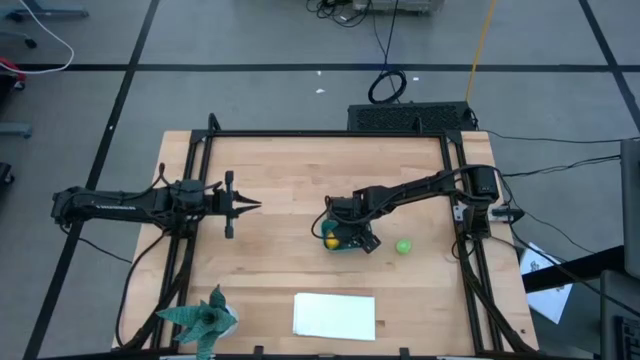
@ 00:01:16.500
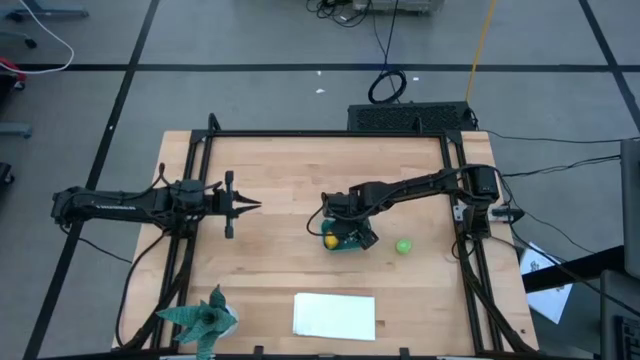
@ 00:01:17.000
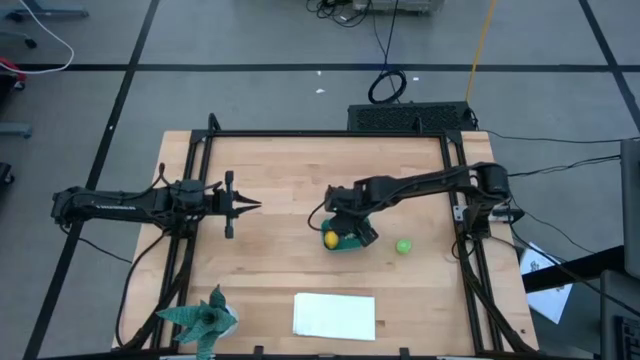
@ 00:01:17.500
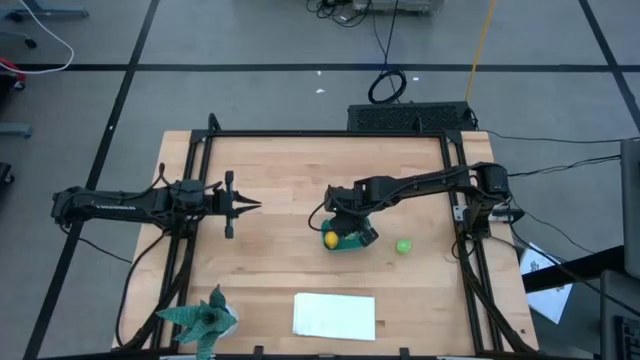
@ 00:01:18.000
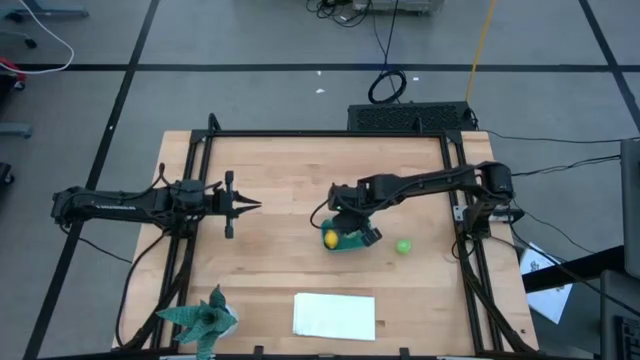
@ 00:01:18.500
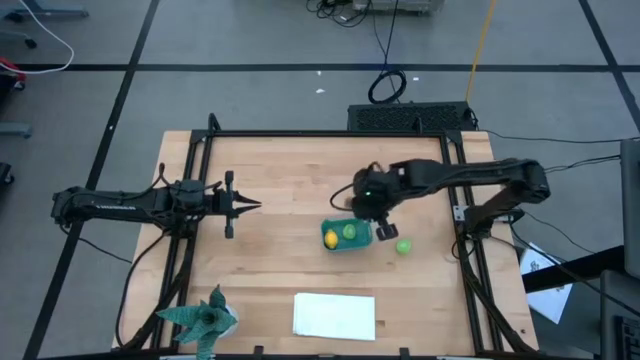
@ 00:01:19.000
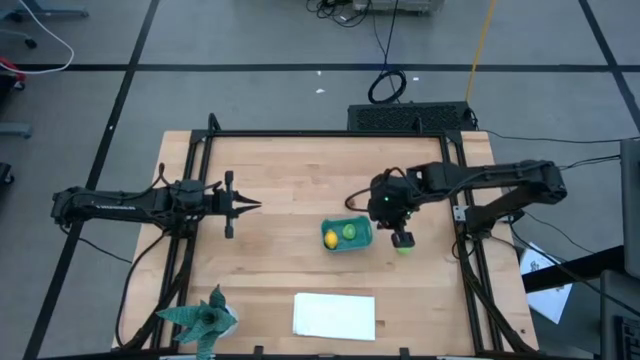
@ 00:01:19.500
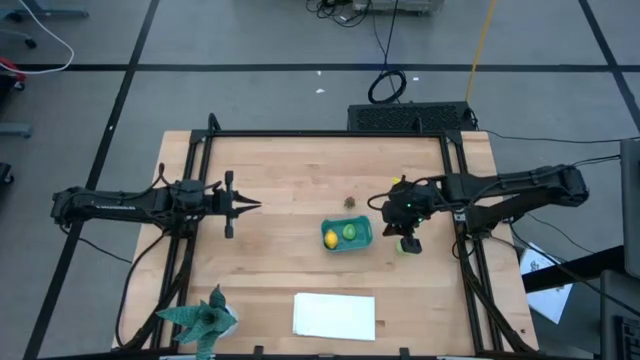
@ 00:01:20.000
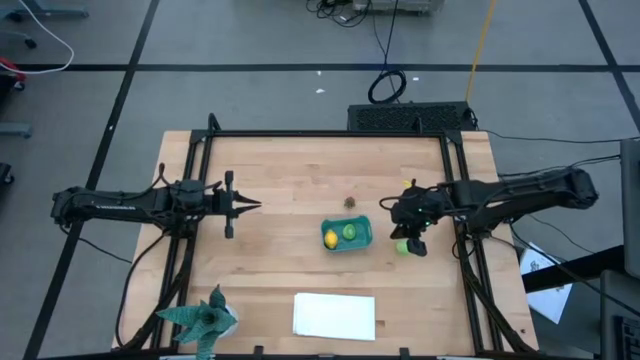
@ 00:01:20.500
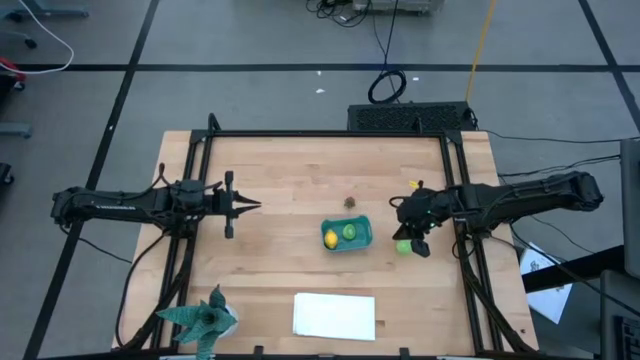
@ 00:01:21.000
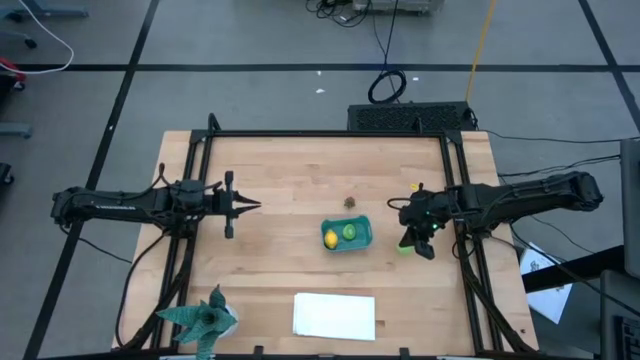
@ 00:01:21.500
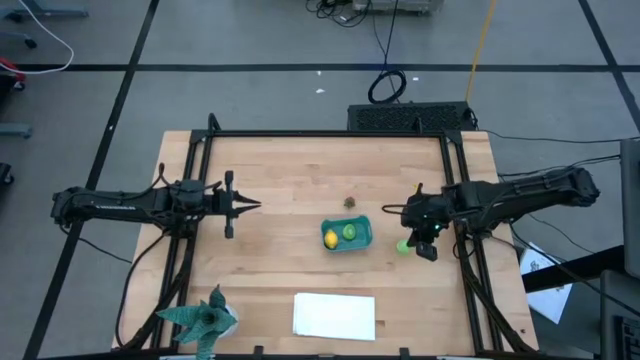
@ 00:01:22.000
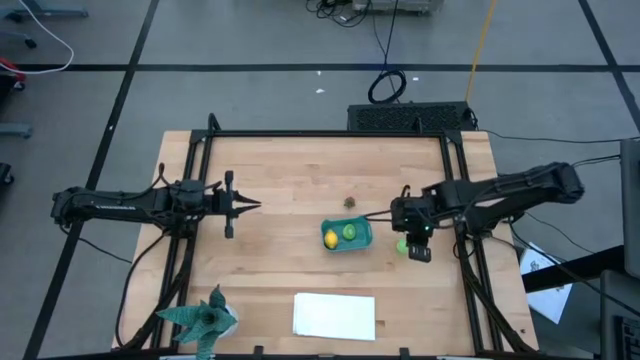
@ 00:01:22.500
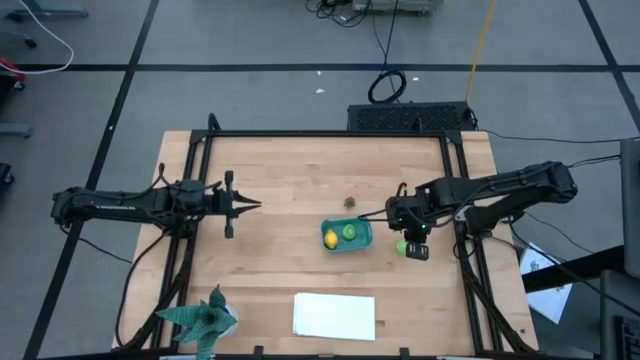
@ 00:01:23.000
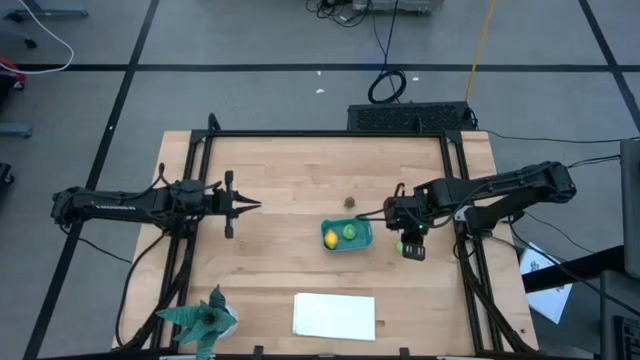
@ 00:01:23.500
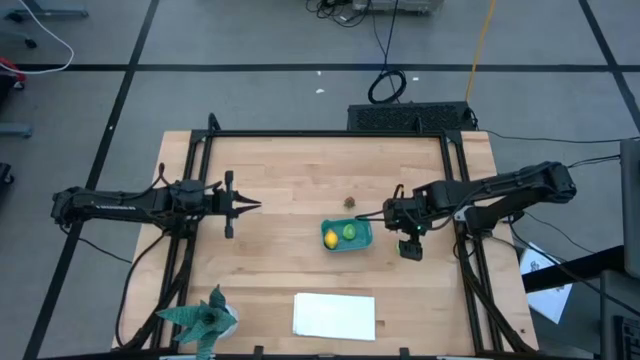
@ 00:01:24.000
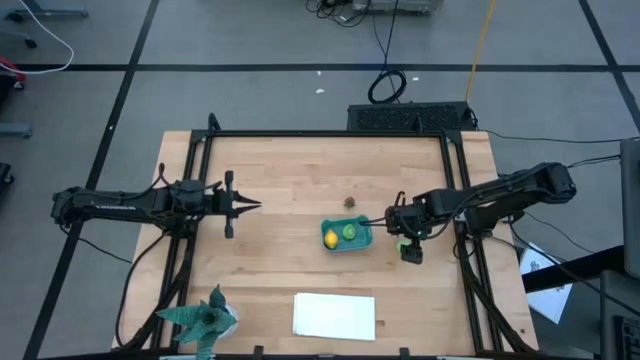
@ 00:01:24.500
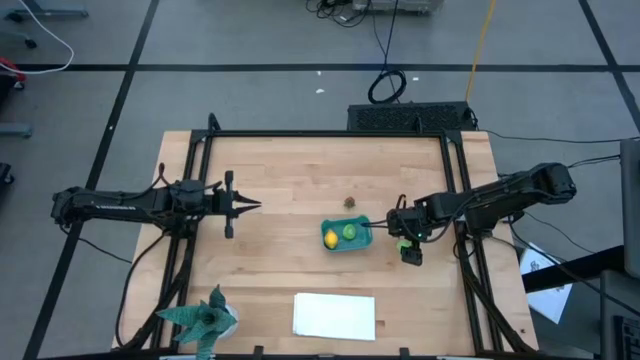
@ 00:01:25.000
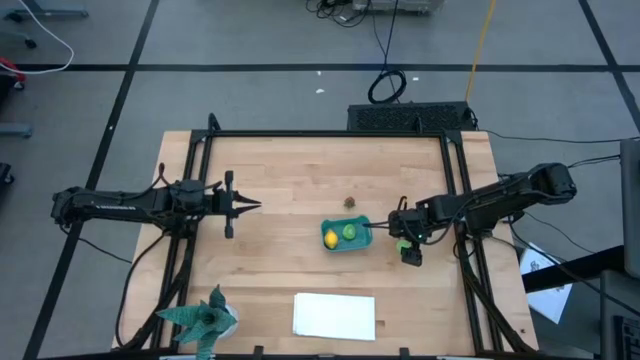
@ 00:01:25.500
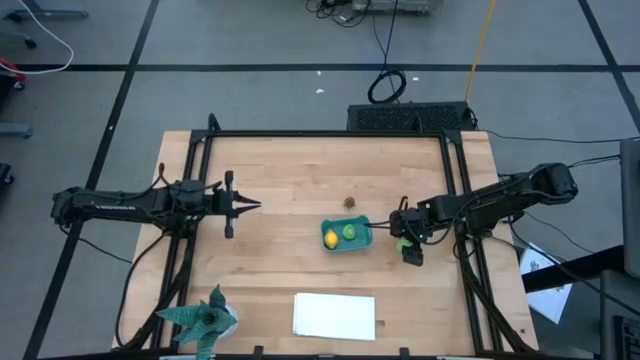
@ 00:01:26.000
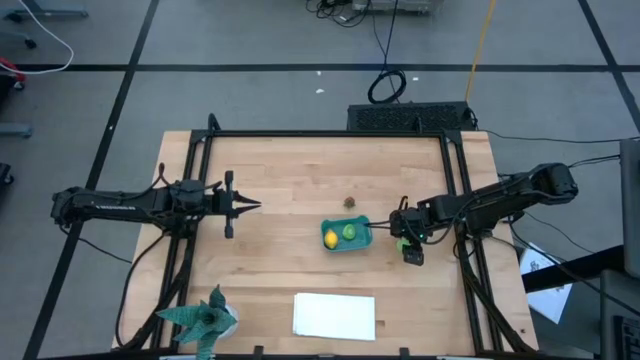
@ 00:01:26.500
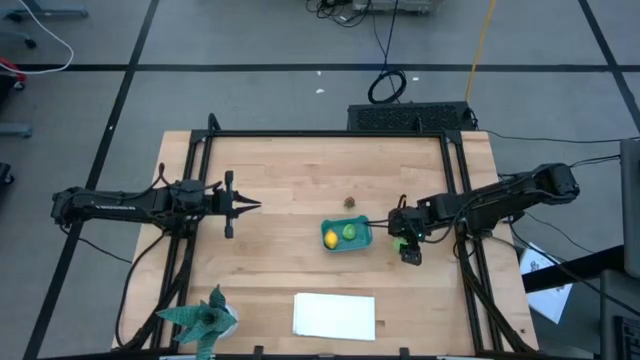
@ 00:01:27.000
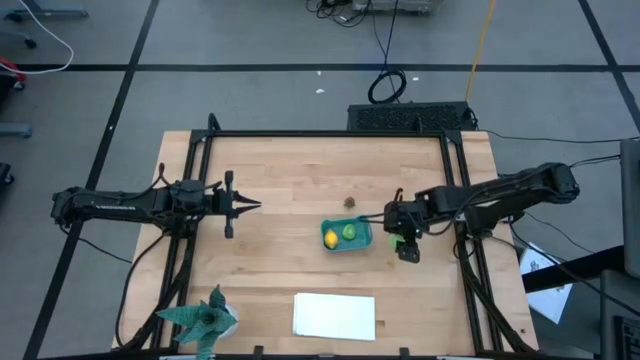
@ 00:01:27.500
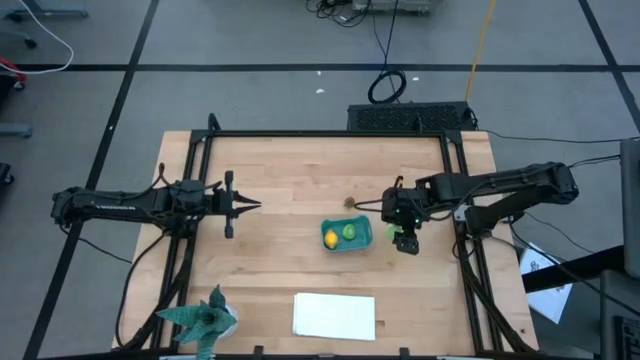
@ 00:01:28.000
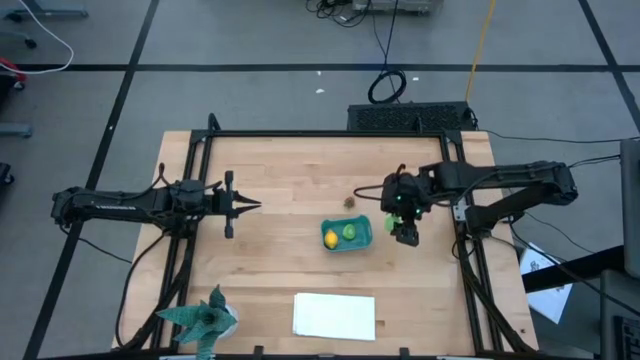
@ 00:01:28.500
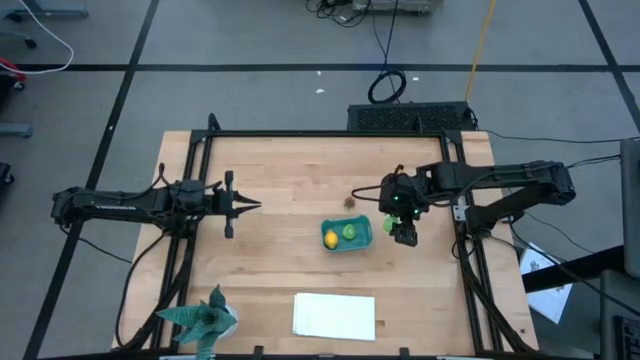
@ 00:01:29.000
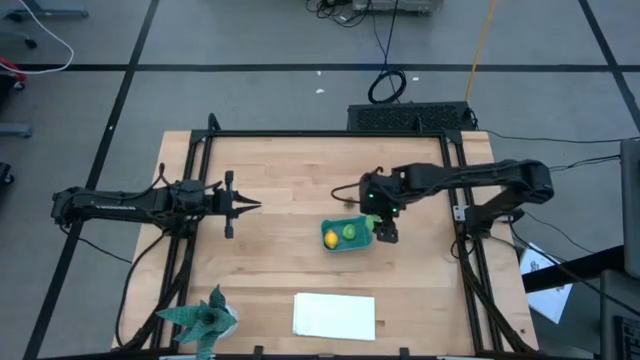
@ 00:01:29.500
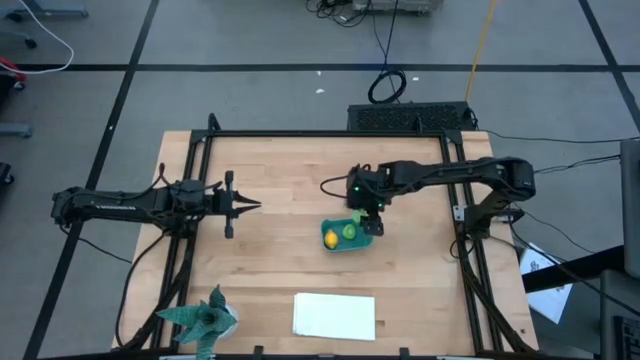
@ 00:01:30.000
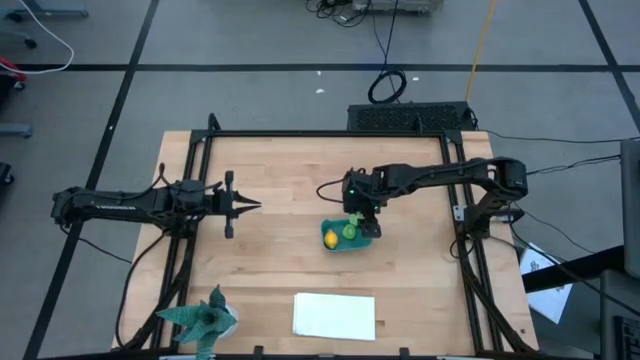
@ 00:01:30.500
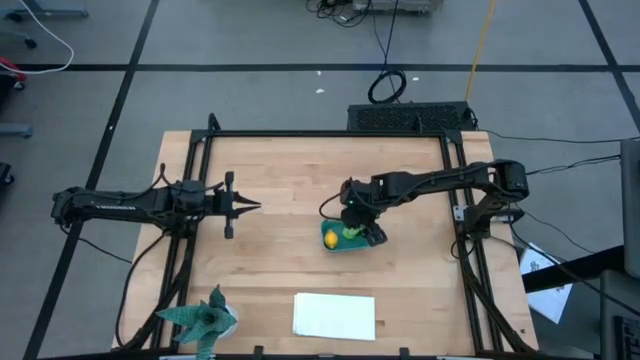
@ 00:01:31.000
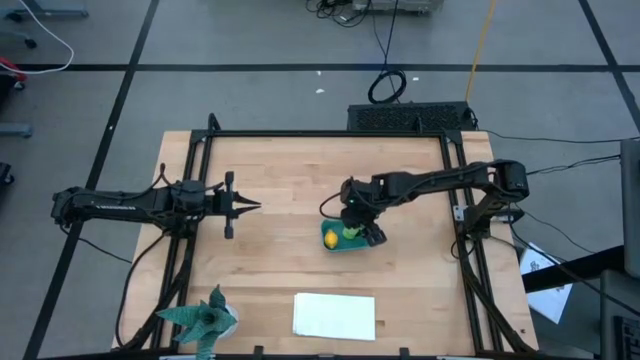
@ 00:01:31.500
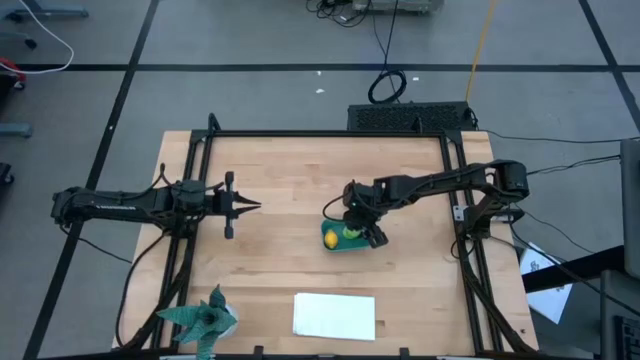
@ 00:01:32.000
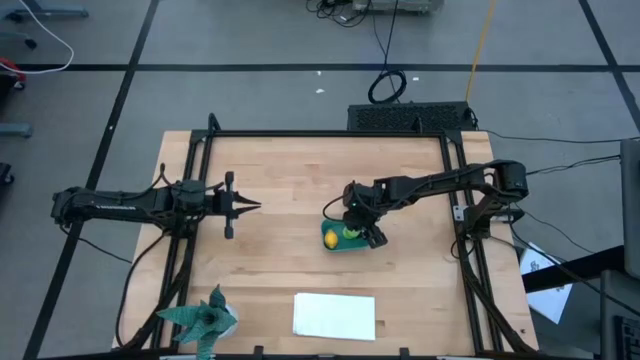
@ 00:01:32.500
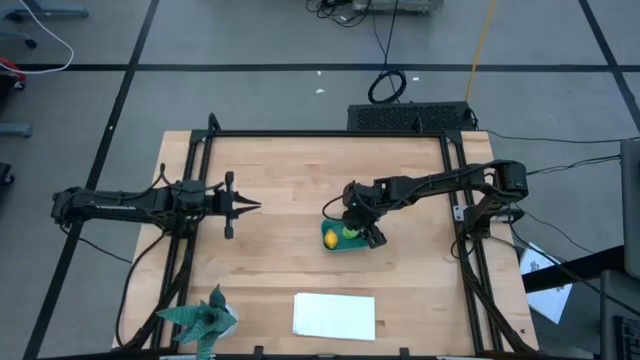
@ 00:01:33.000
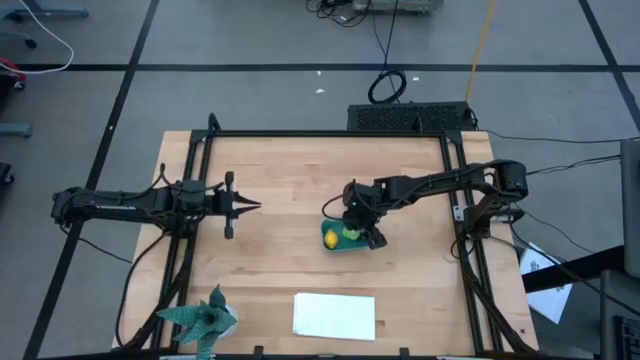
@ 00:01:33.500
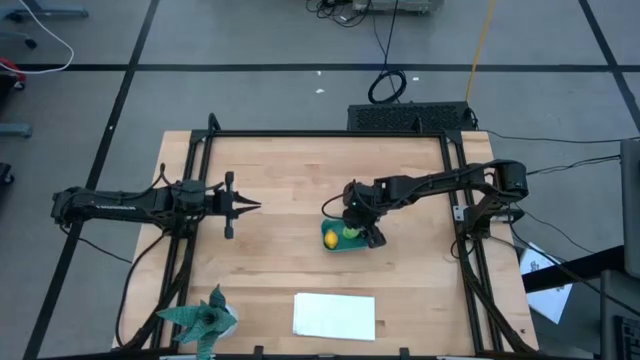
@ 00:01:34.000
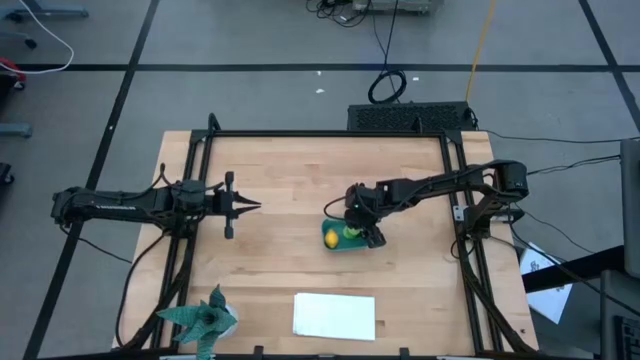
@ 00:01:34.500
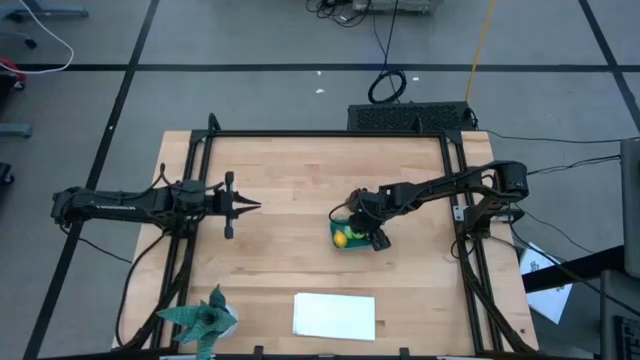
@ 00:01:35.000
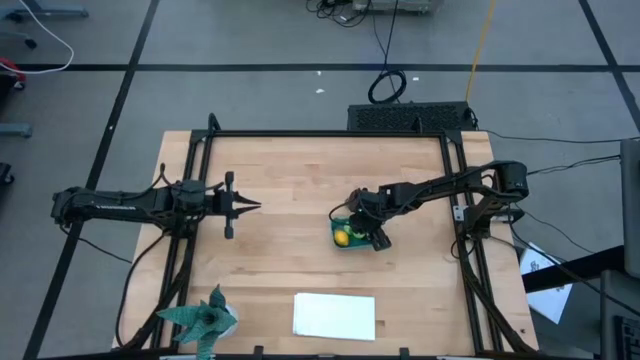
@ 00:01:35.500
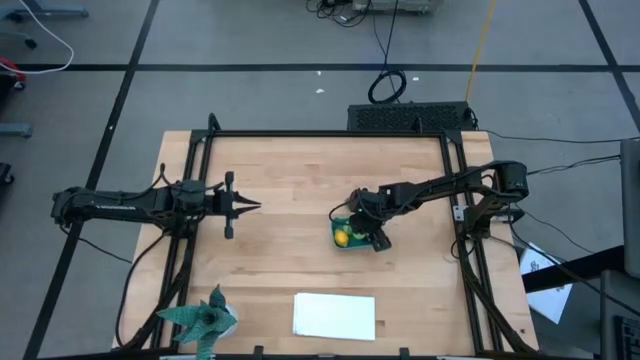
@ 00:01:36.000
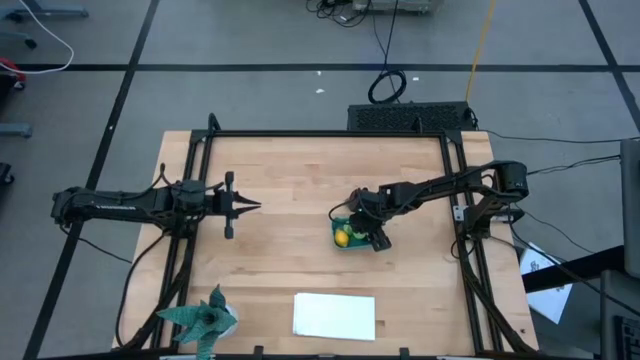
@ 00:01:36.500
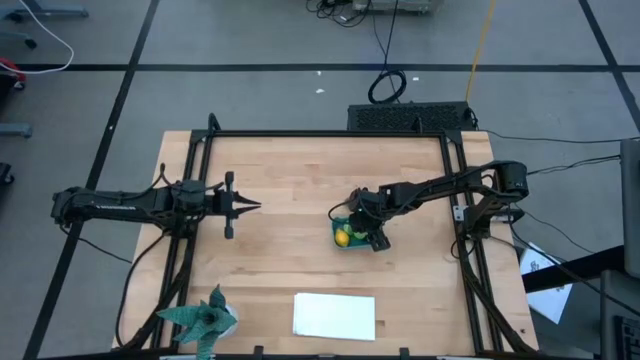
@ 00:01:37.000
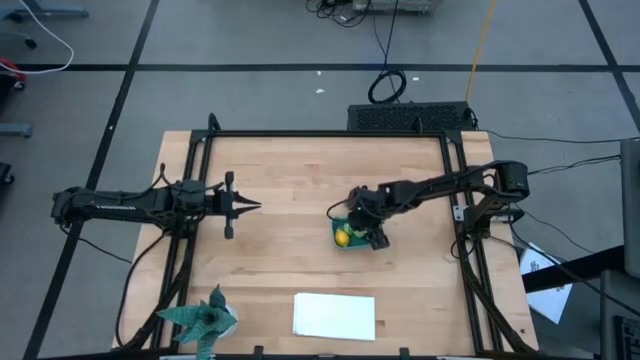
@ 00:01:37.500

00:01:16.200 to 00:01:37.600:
Task: Pick and placing Produce into tupperware
Put the sliced cabbage into the green bin
